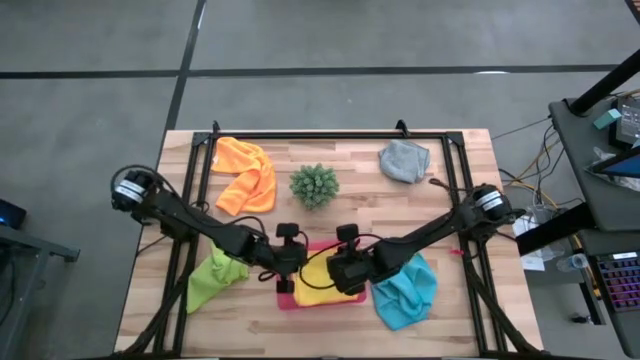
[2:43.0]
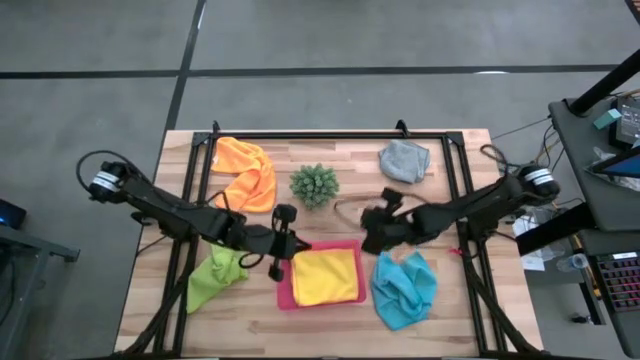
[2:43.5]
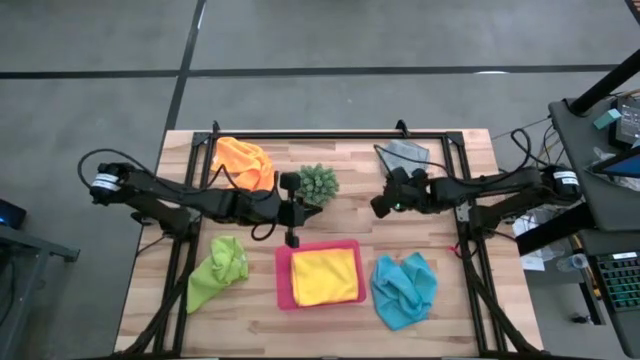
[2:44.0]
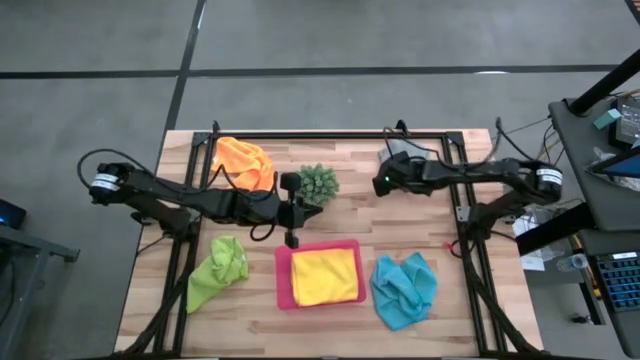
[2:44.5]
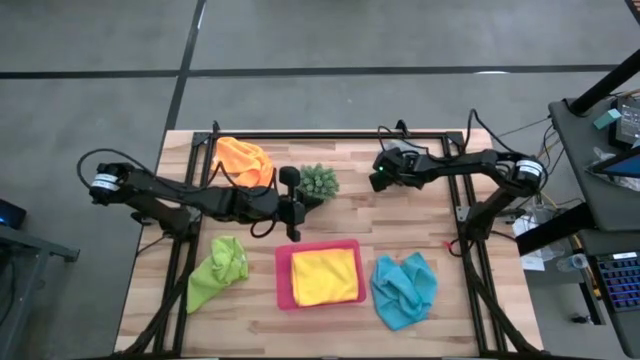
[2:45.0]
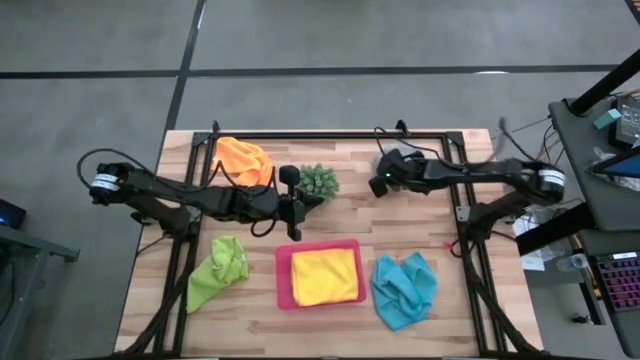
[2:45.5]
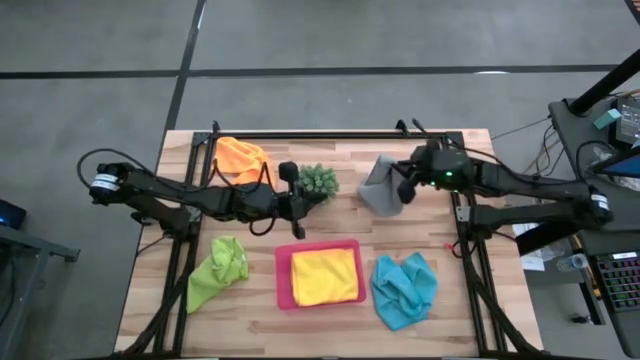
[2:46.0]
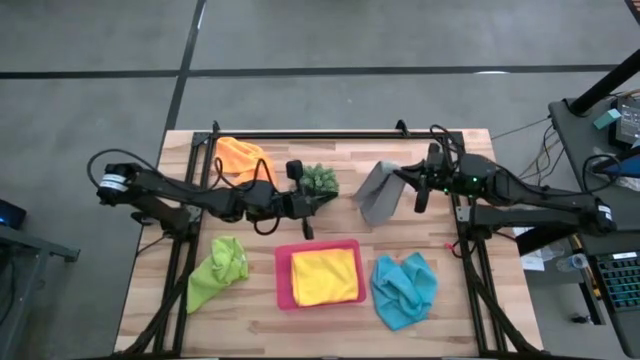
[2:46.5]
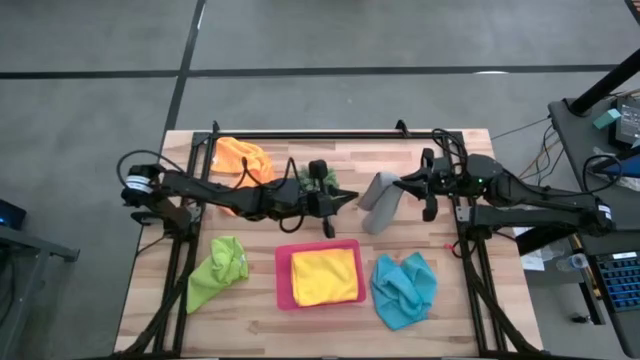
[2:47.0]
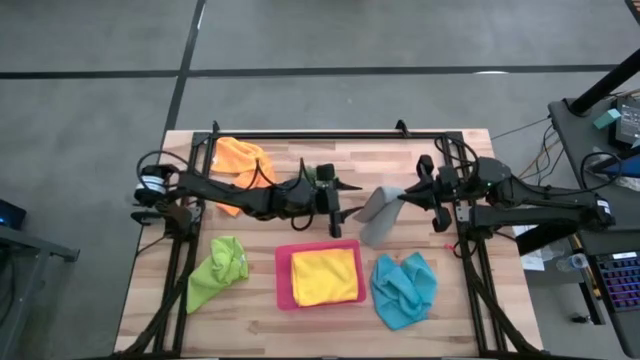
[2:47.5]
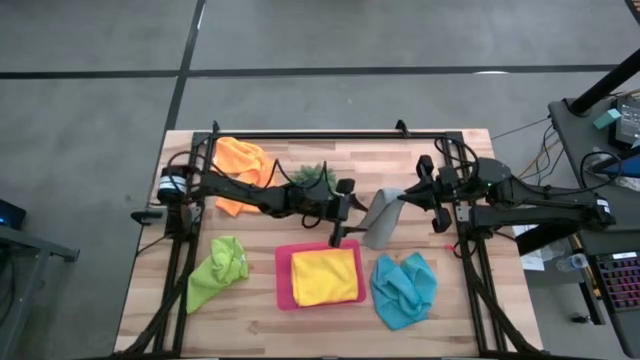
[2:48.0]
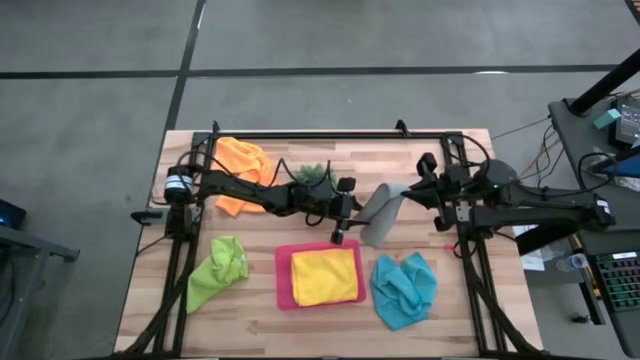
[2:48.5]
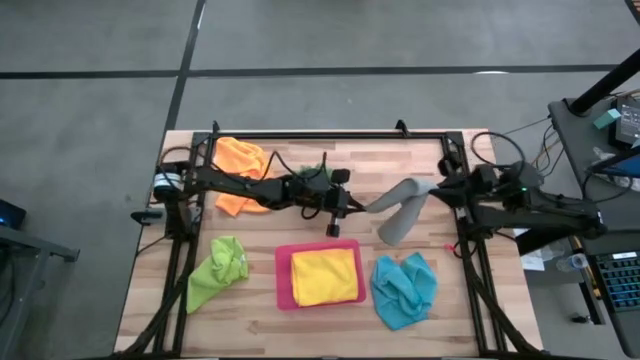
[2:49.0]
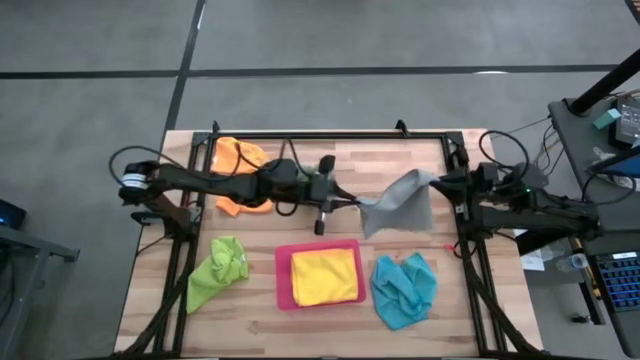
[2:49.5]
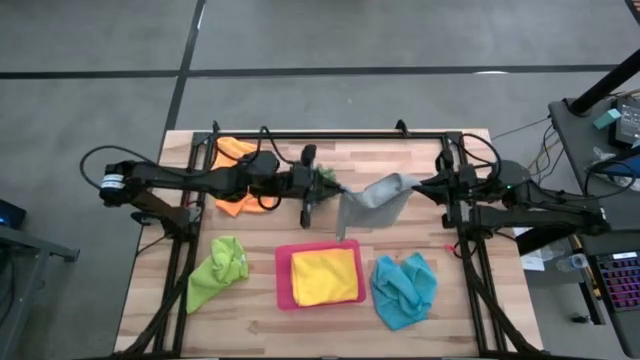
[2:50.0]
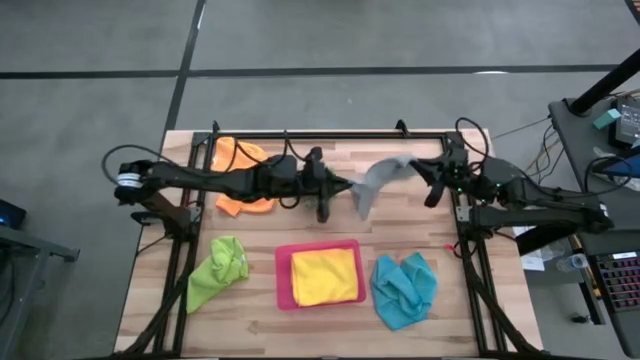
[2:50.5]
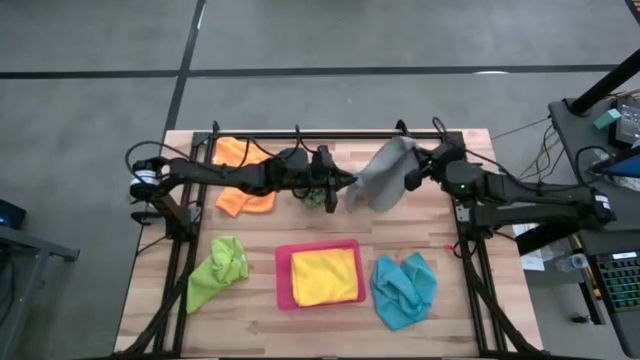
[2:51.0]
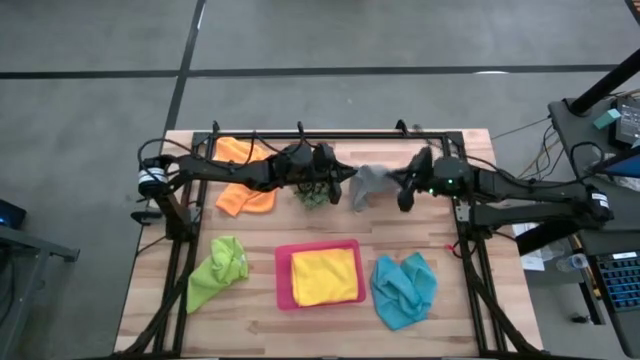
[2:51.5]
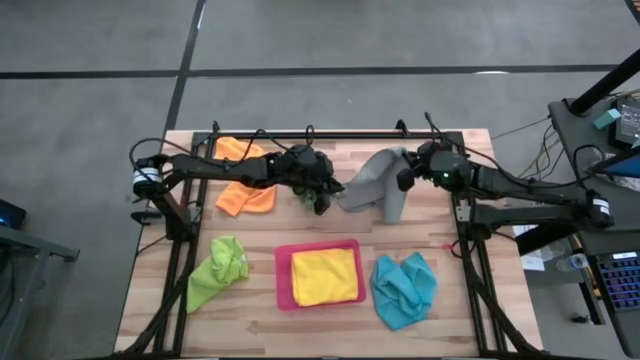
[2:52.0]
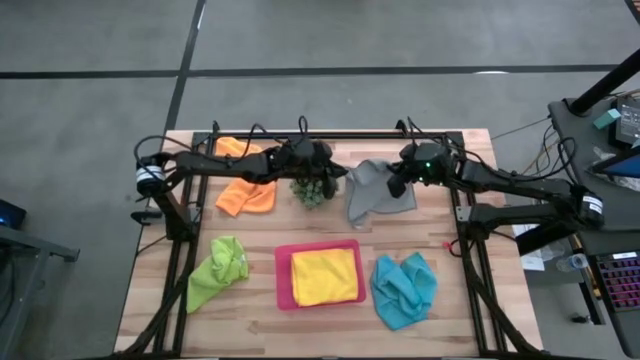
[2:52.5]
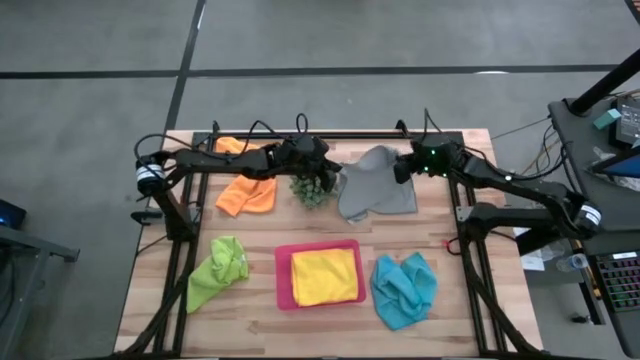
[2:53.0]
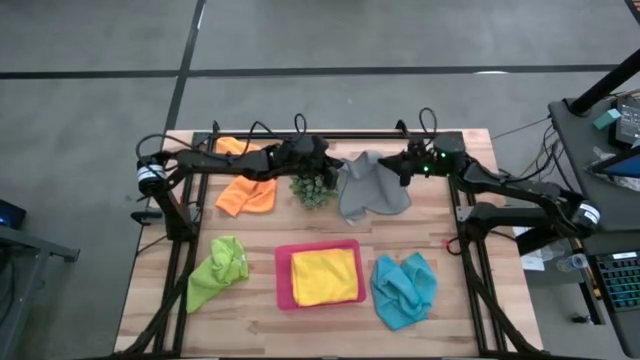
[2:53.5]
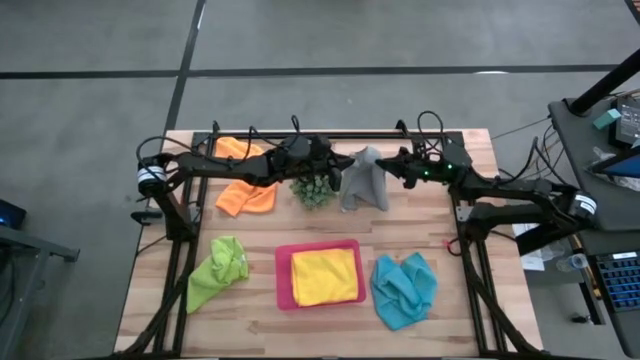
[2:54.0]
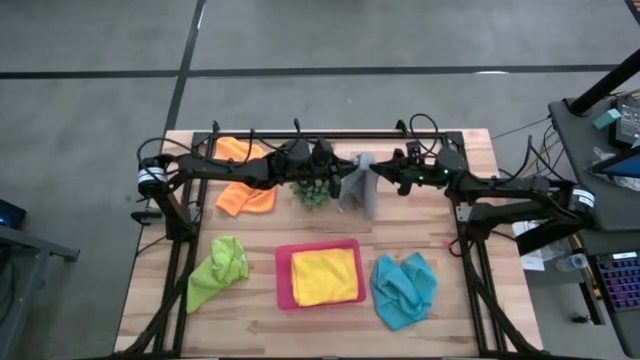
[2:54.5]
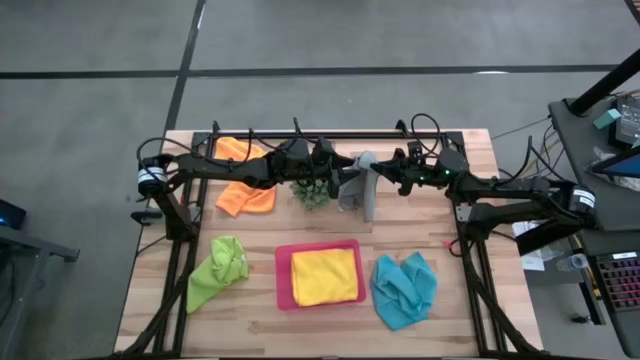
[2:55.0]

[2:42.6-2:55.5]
Task: Fold microfiber towels
Fold the gray microfiber cloth

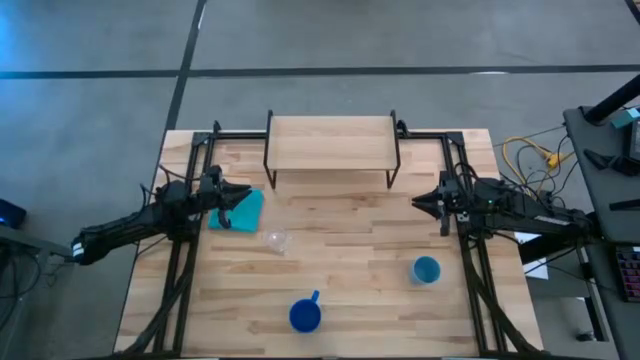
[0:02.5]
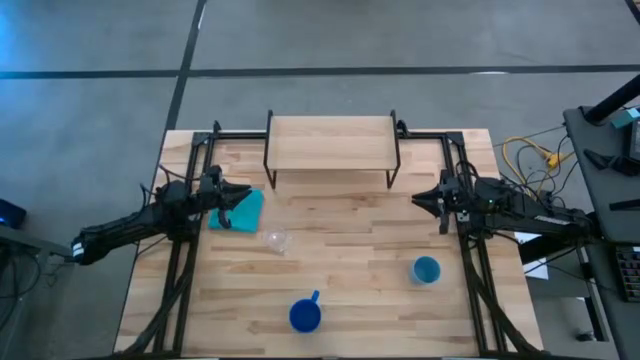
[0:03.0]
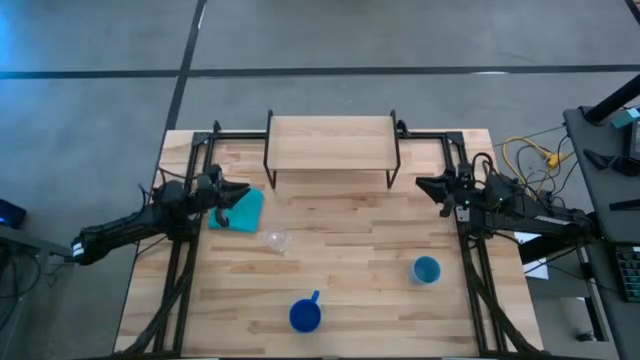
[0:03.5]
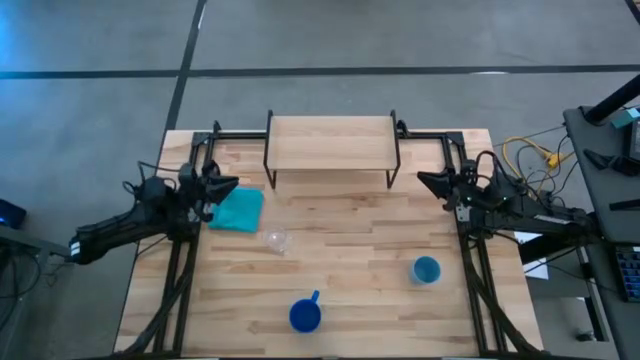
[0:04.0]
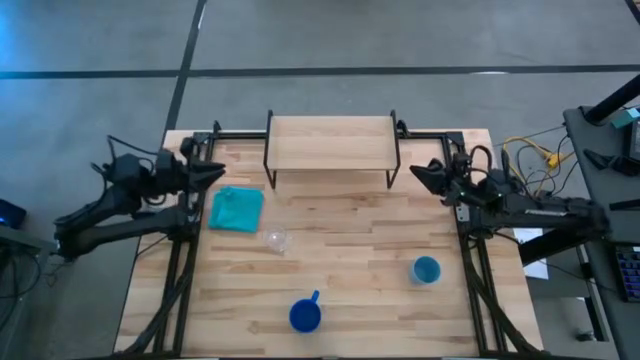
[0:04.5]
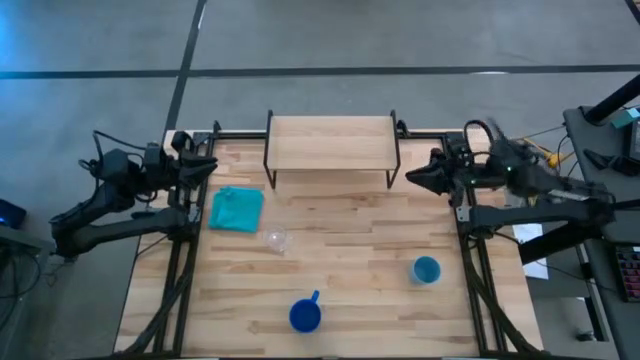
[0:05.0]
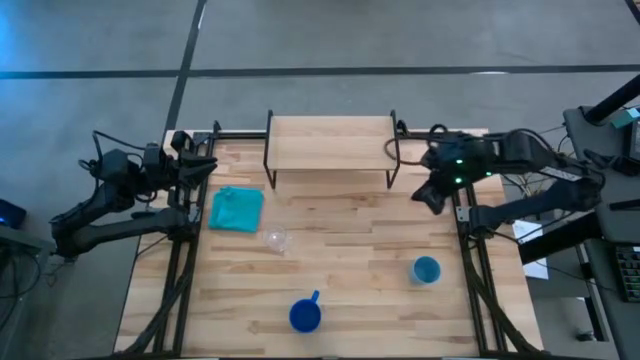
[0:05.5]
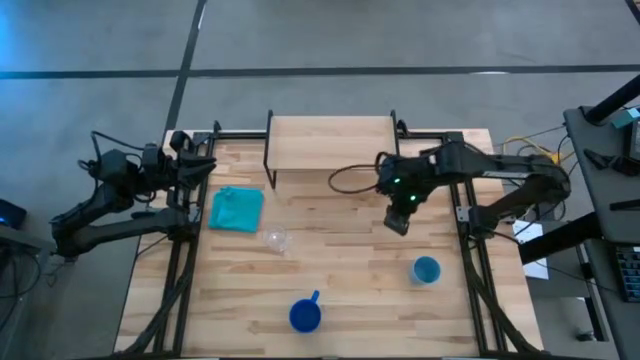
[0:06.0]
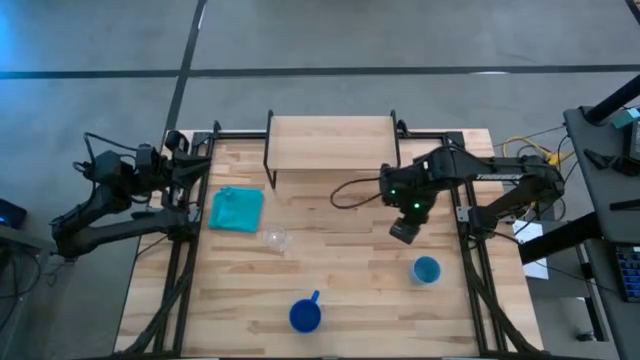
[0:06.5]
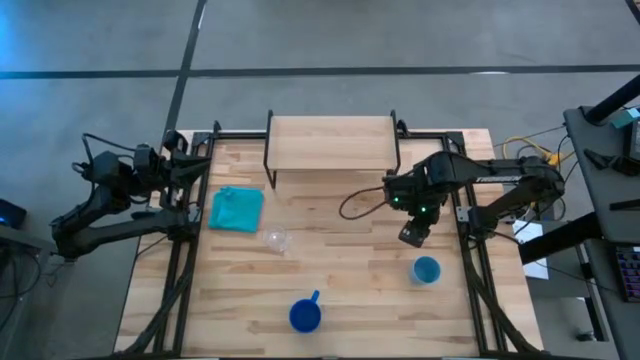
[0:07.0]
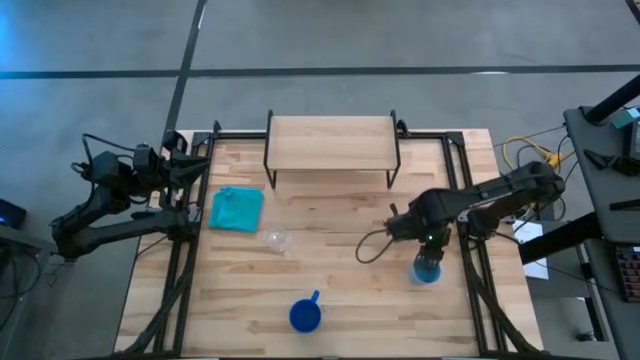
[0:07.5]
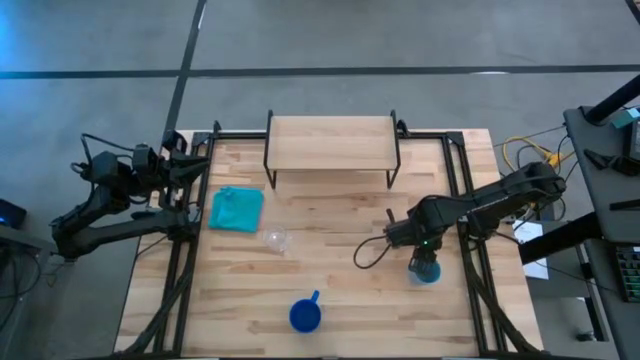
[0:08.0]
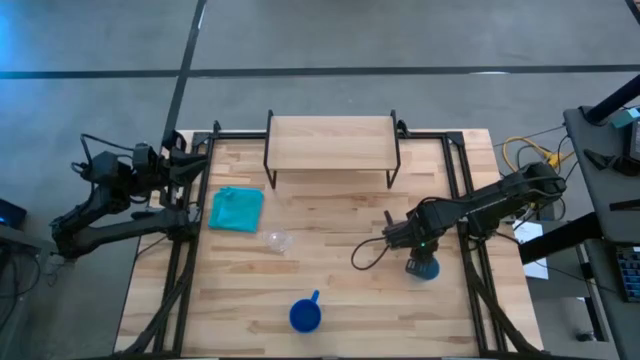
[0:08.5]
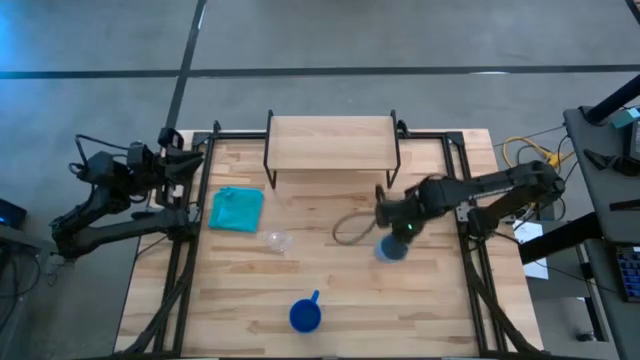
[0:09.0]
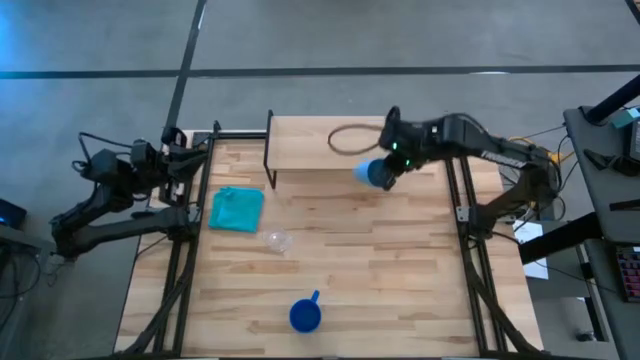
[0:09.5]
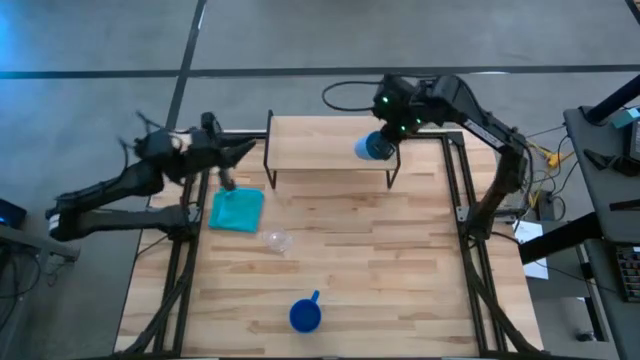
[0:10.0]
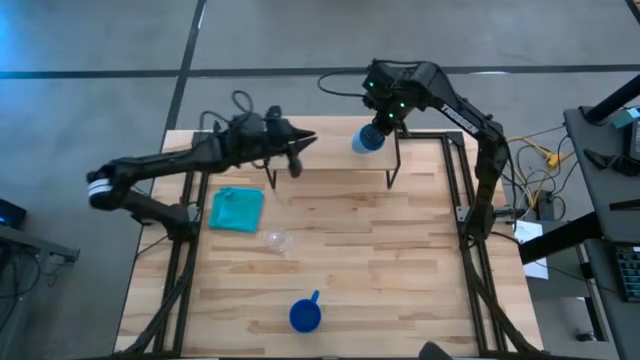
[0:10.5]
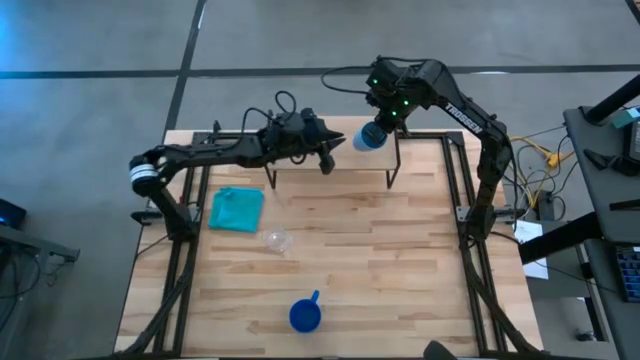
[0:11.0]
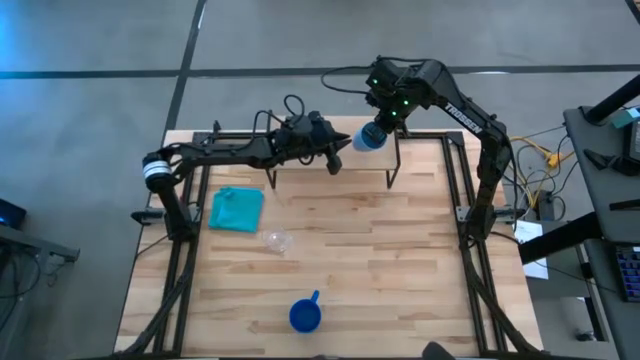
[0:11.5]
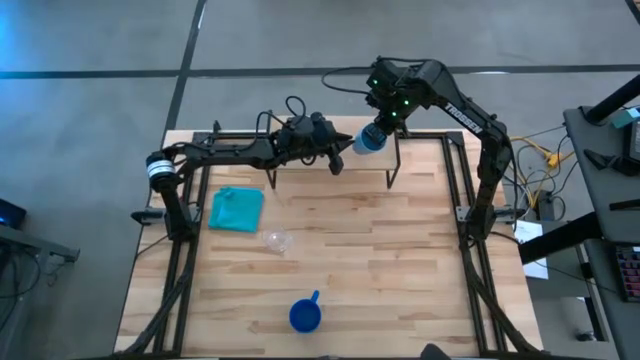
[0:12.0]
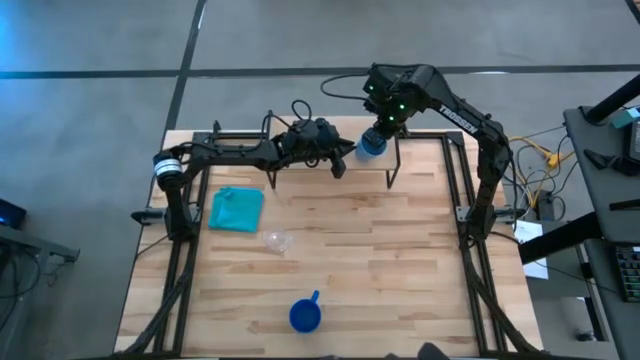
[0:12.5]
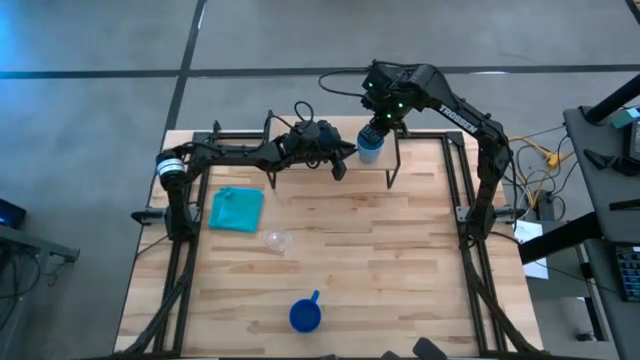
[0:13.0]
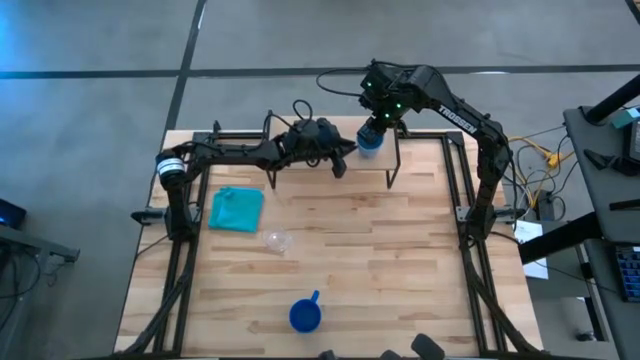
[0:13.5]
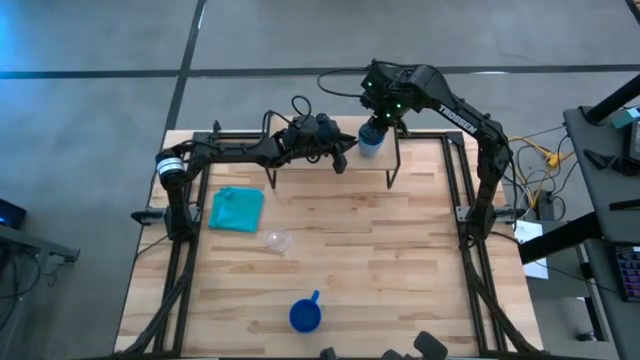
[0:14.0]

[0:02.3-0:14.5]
Task: Stack small to large cups/mugs on shelf
Put the blue cup on the shelf
